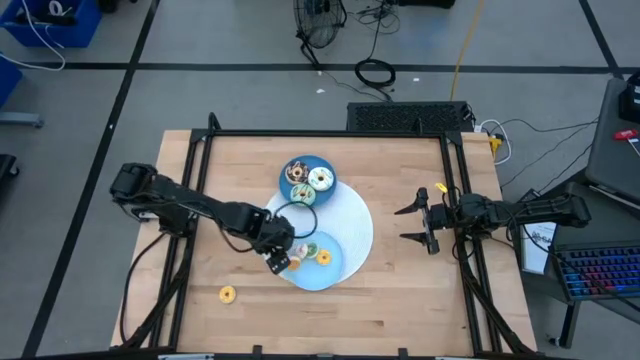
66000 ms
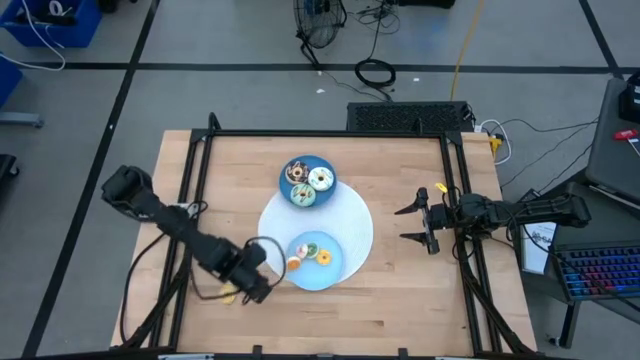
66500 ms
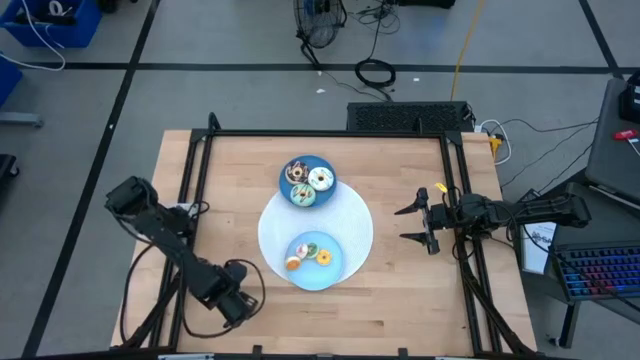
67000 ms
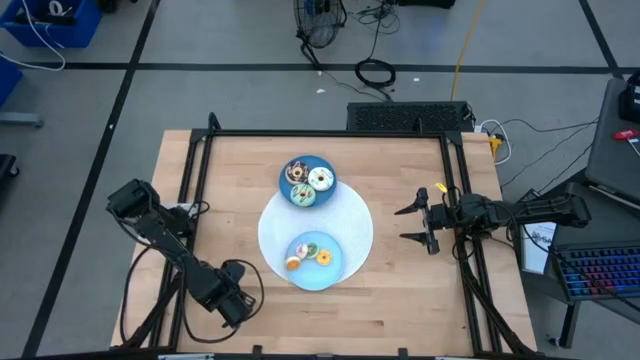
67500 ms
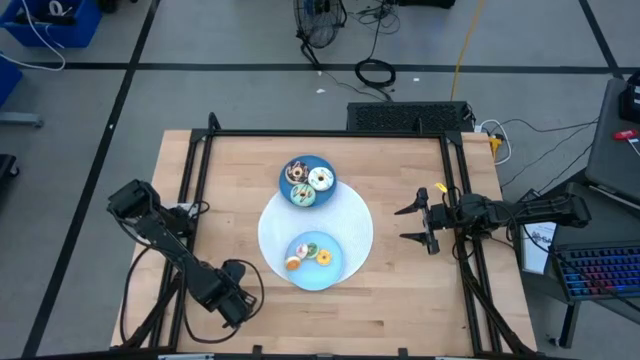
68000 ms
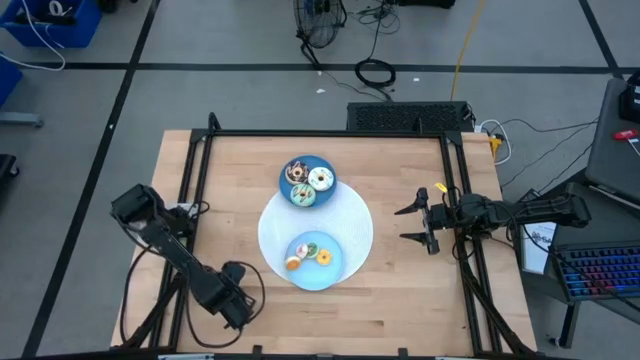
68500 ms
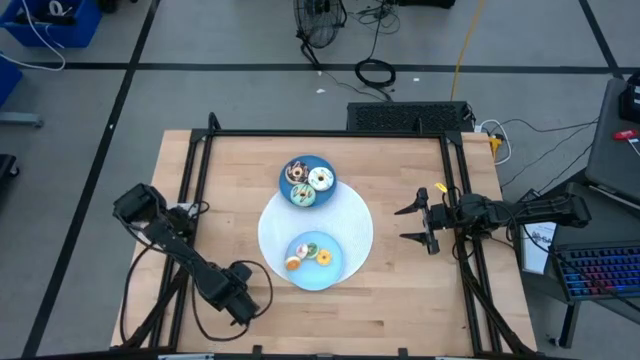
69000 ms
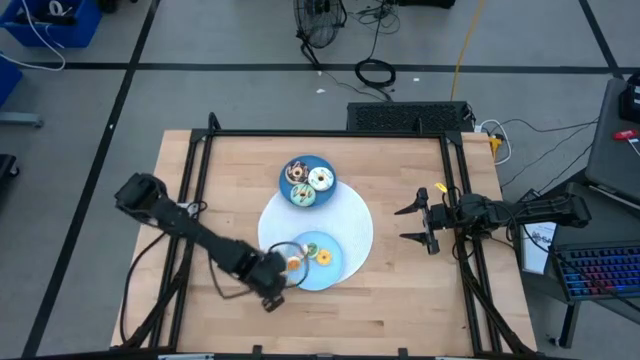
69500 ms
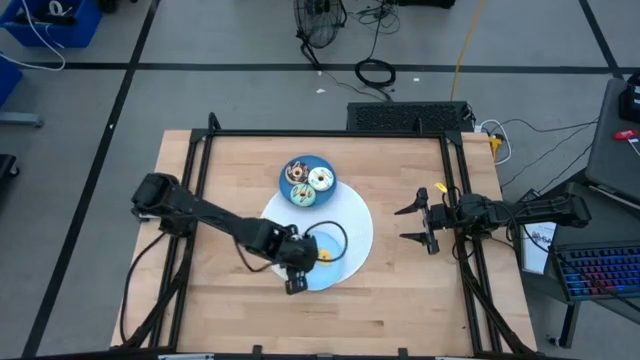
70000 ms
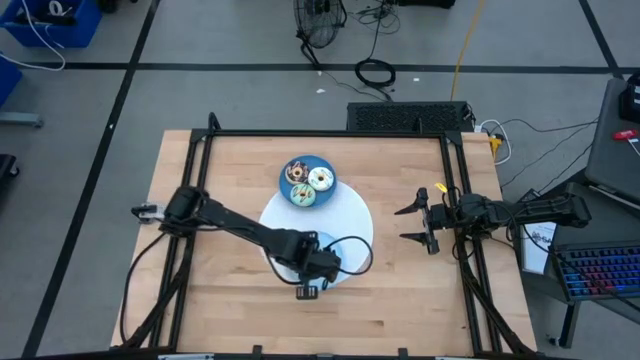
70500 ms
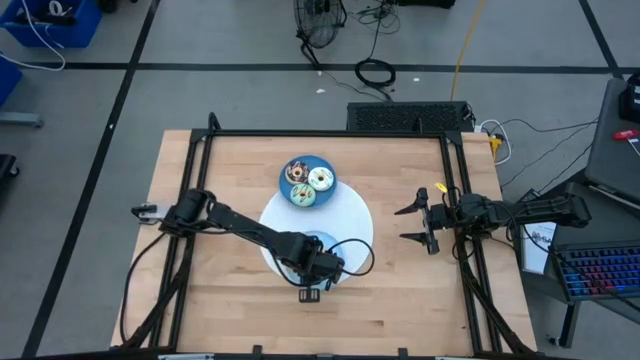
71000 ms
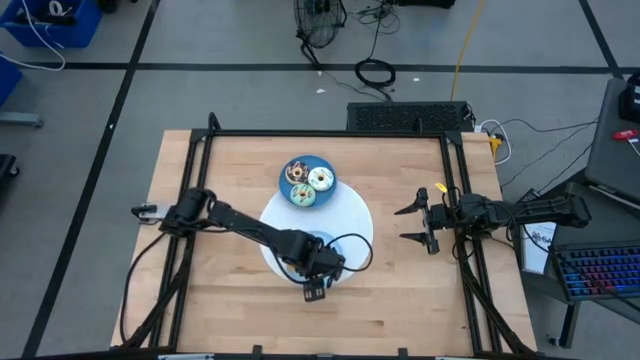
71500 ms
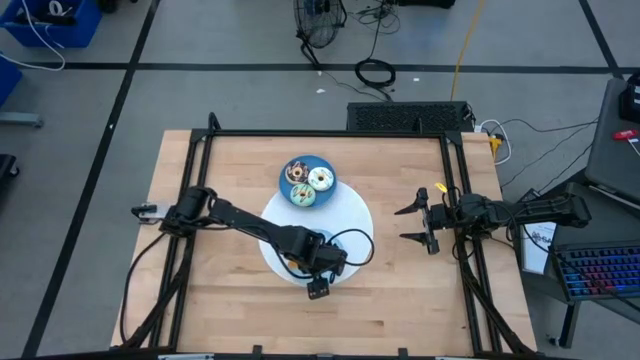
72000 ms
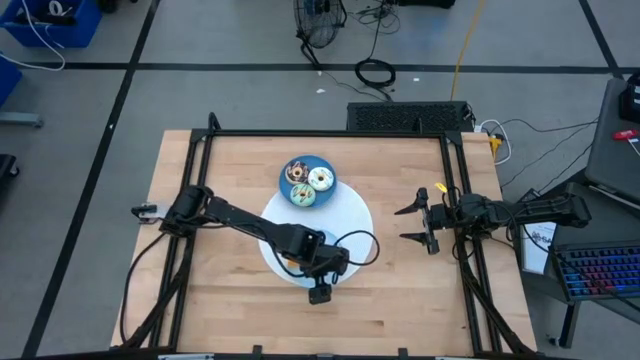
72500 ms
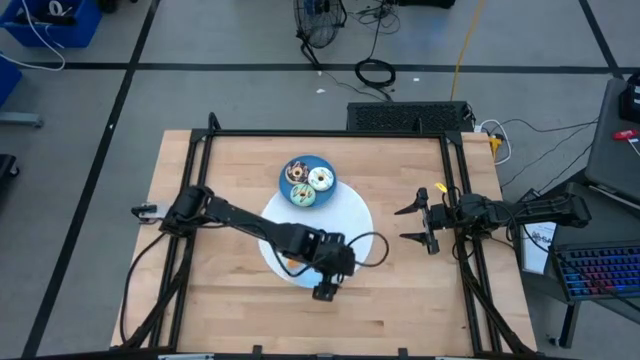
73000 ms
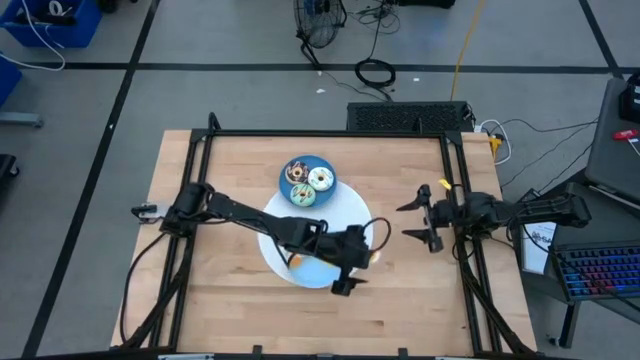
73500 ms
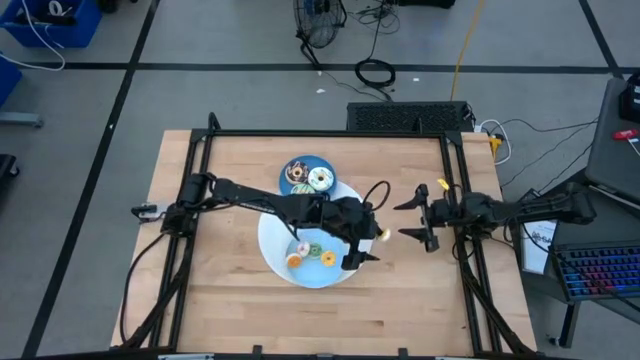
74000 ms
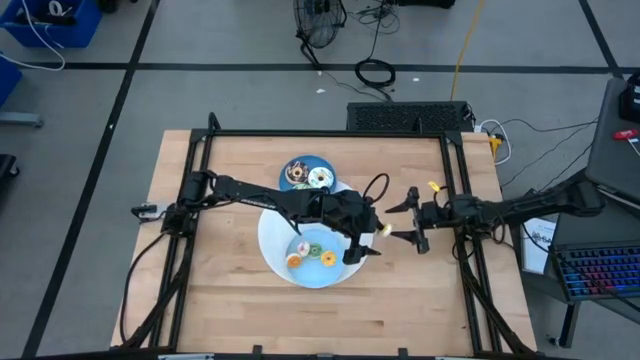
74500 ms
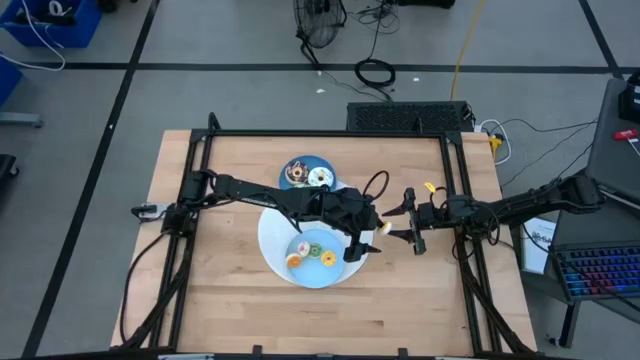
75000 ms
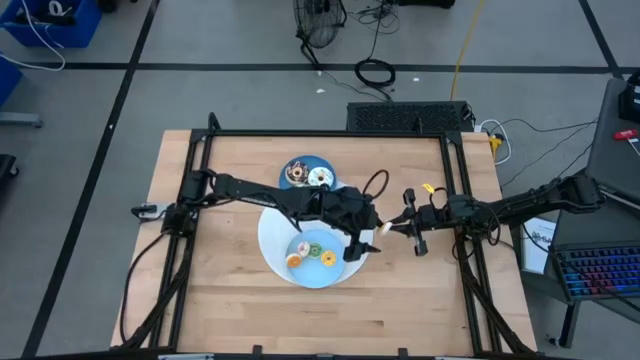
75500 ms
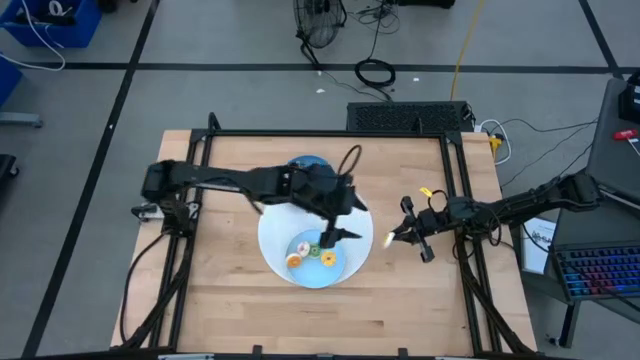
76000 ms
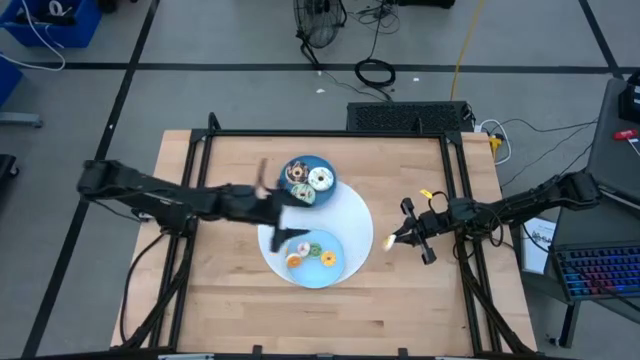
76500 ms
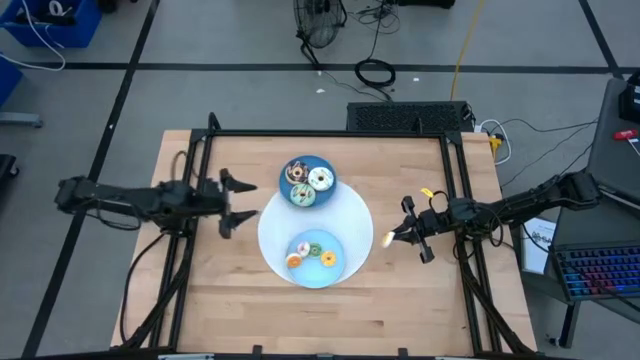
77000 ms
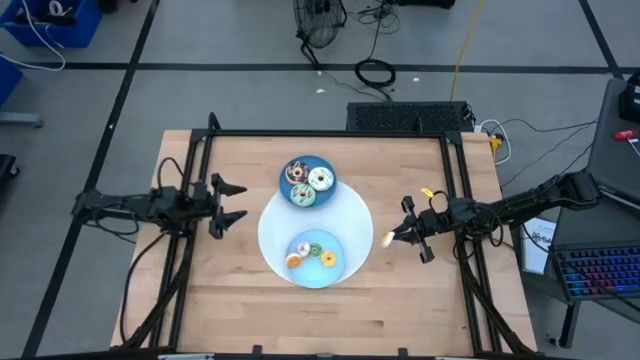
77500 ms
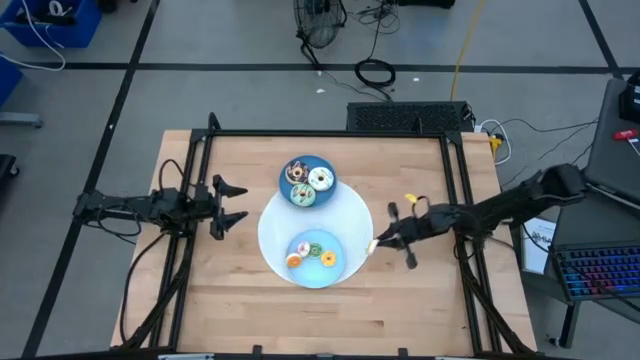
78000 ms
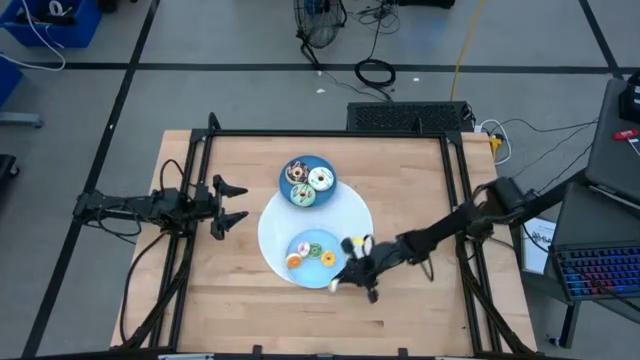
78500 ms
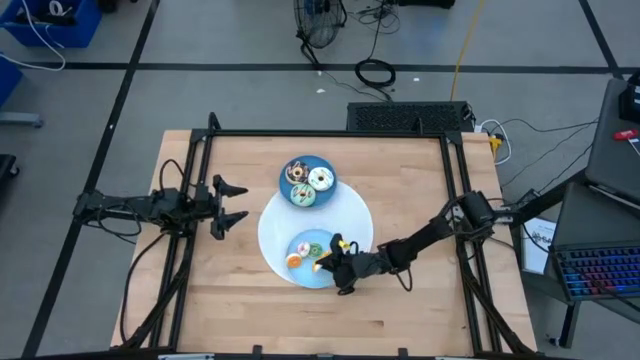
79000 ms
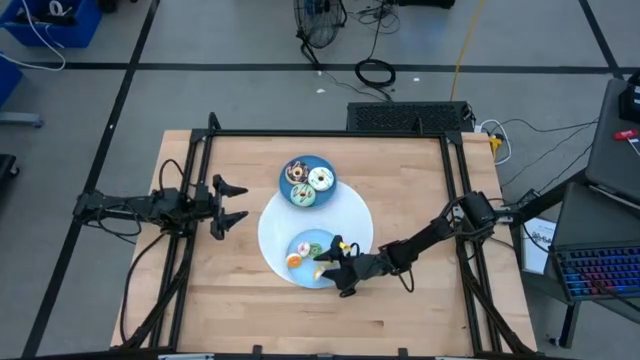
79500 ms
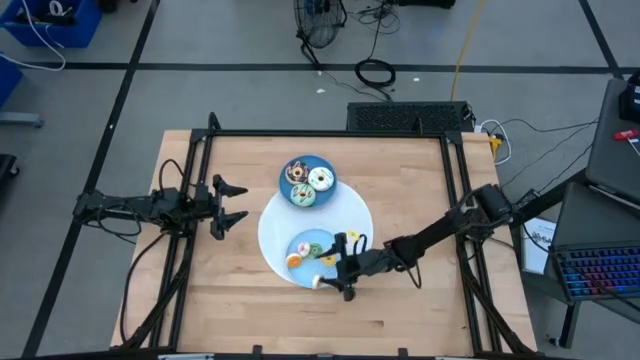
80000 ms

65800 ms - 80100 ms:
Task: Pick & Place donuts
Put the small yellow donut on the light blue plate

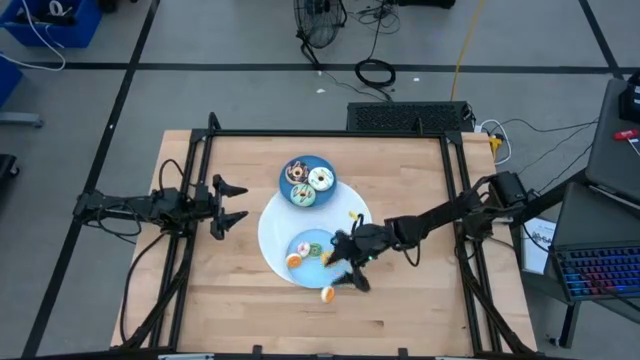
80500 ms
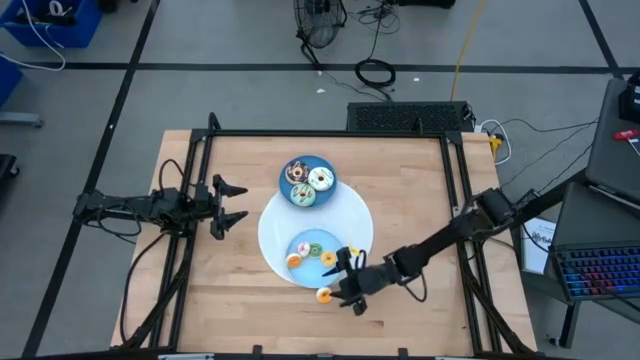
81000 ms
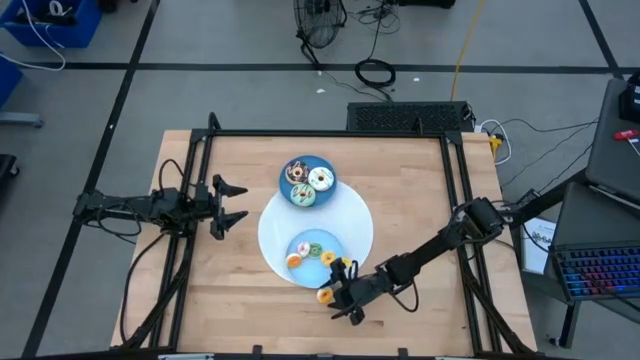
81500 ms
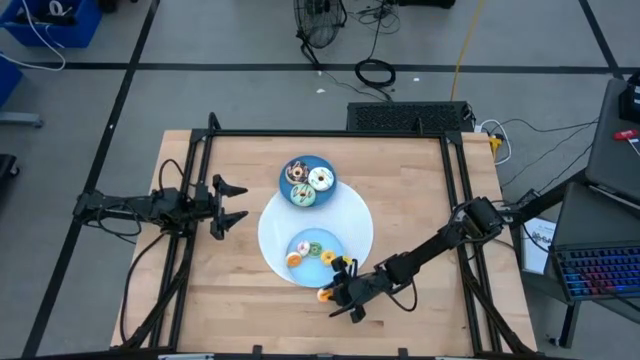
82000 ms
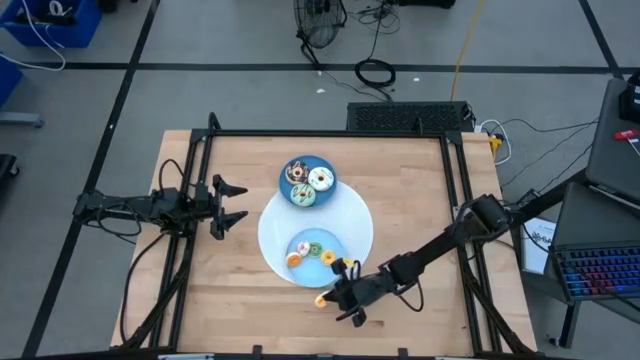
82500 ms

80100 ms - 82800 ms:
Put the small yellow donut on the light blue plate

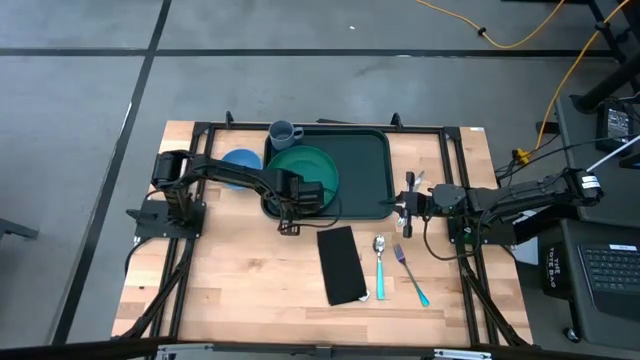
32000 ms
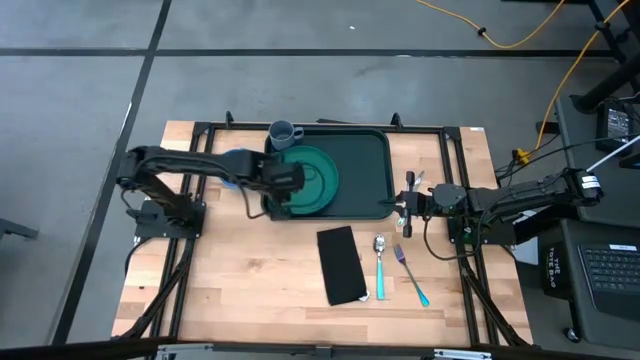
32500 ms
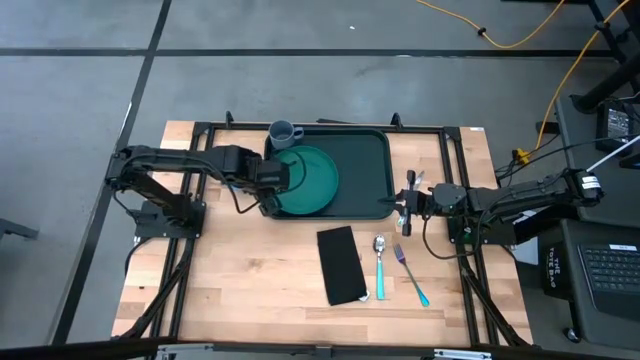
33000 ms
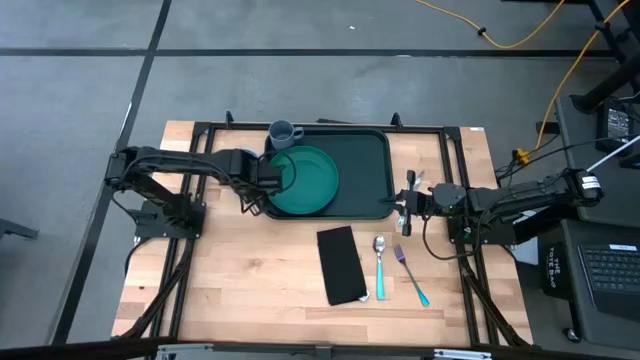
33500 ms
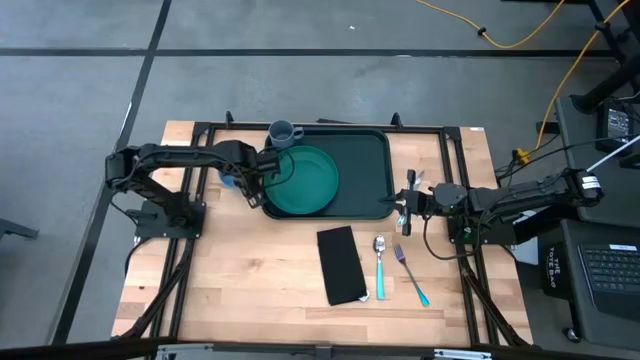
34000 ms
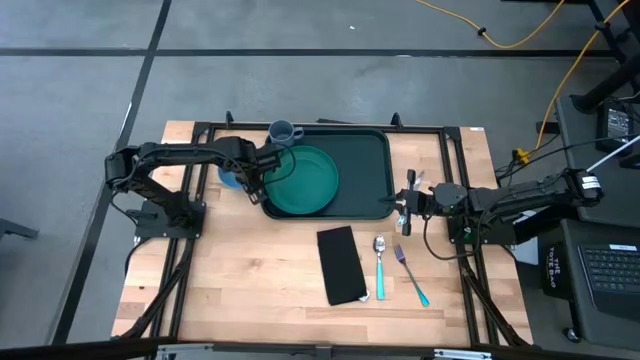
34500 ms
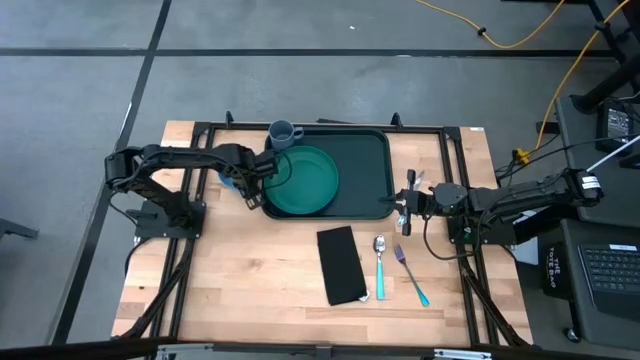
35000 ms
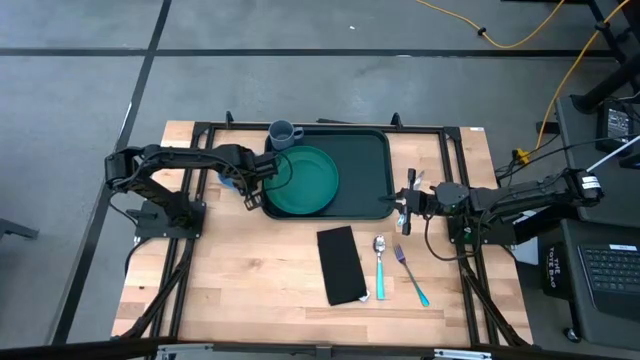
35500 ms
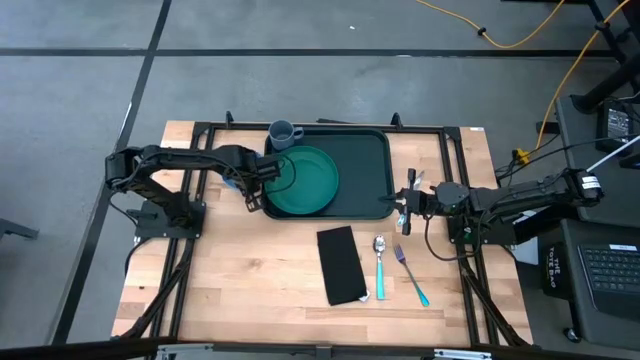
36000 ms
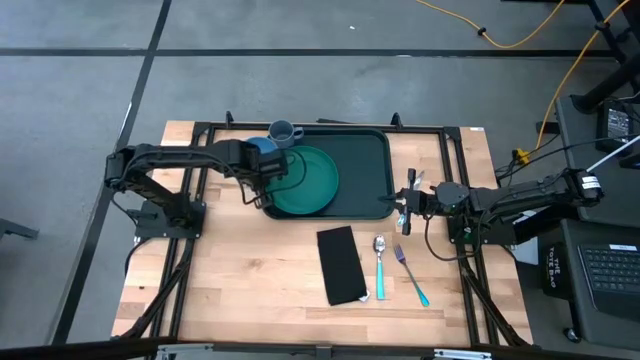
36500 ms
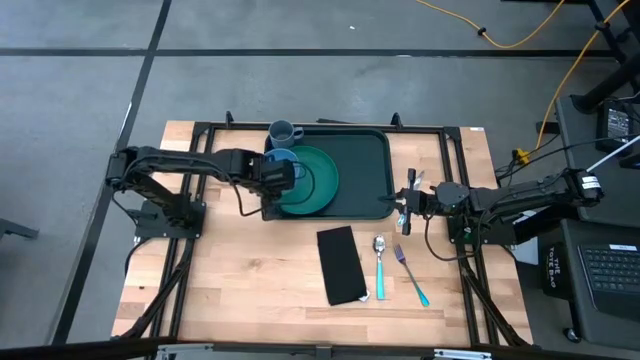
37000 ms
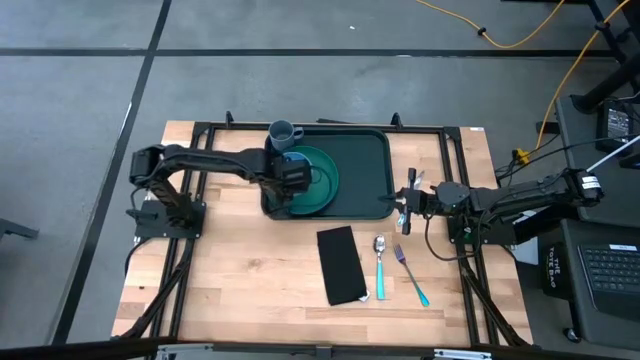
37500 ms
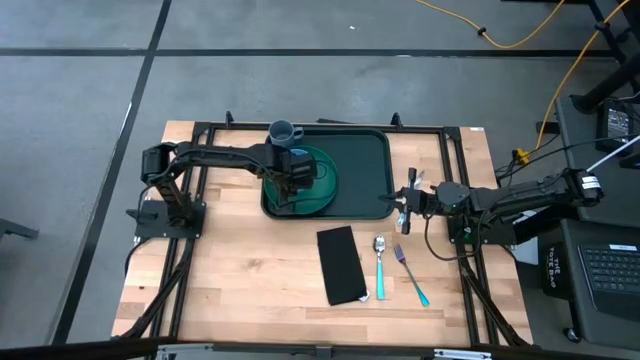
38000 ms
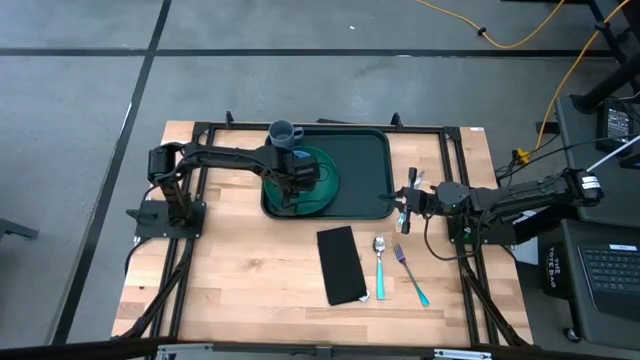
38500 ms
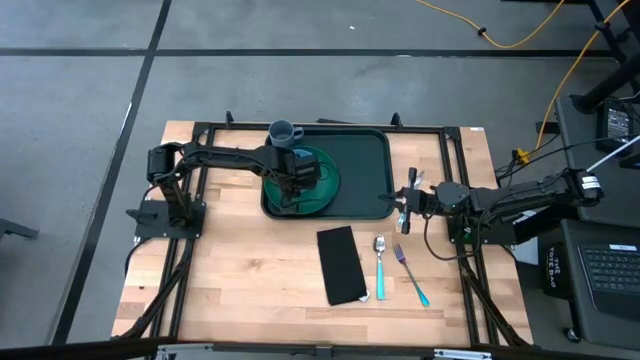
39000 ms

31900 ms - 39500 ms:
Task: Set up tray
Put the blue bowl on the green plate on the green serving tray
